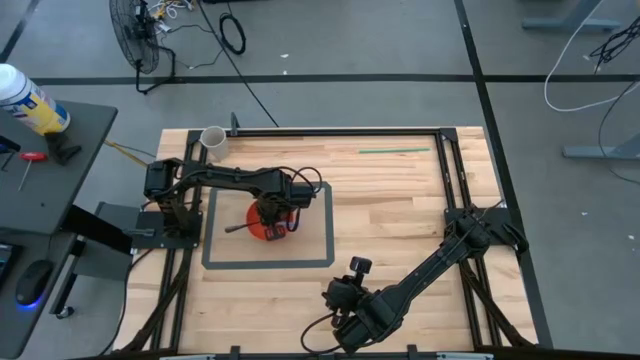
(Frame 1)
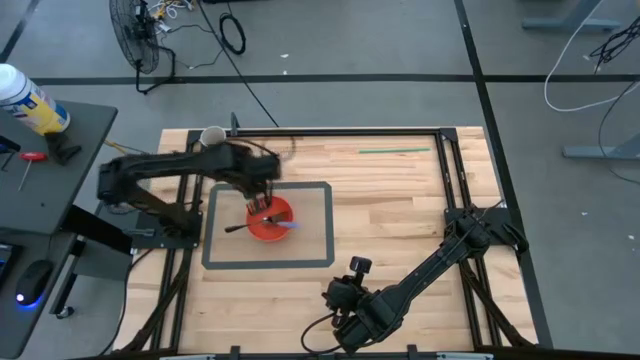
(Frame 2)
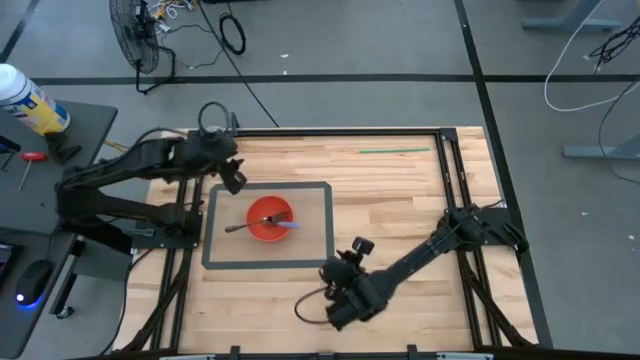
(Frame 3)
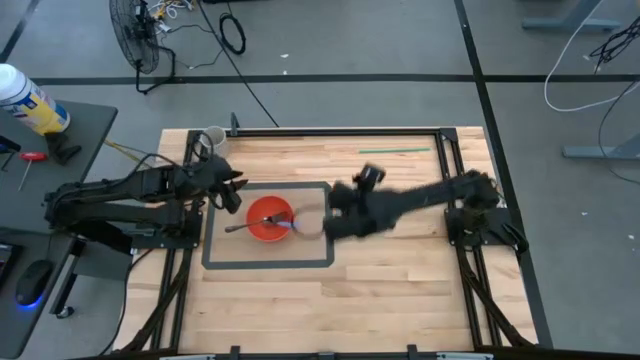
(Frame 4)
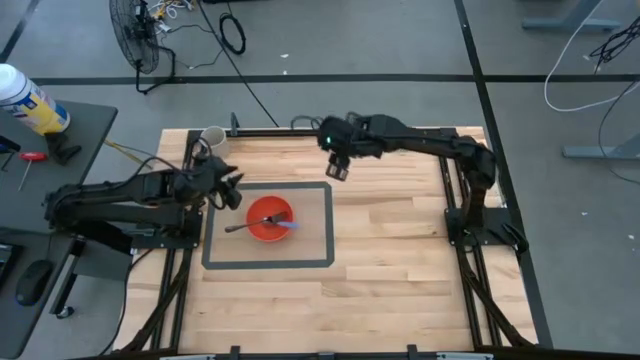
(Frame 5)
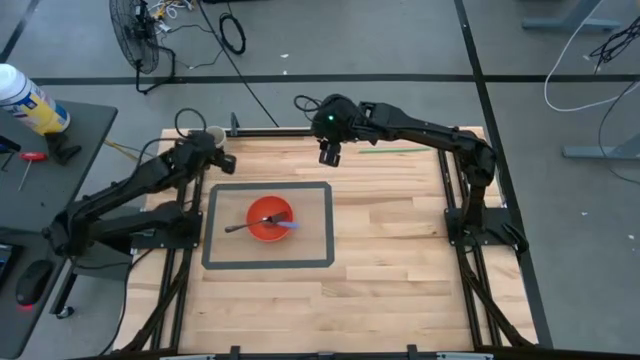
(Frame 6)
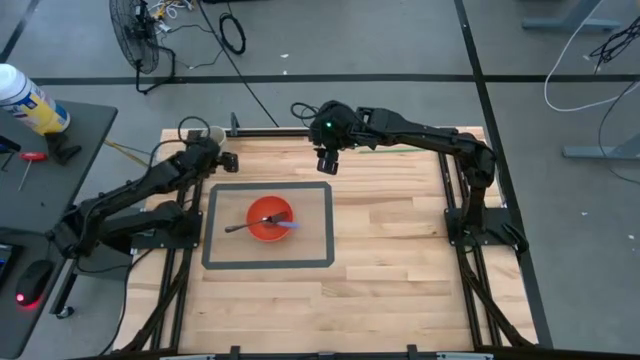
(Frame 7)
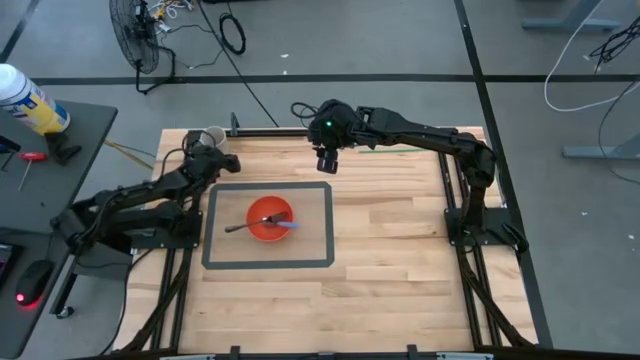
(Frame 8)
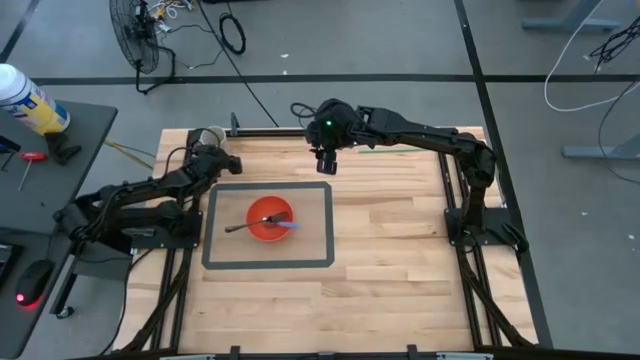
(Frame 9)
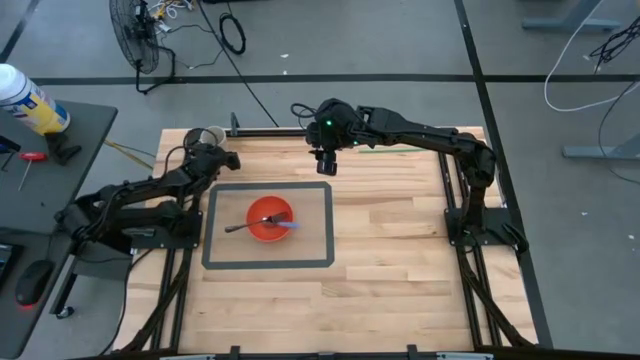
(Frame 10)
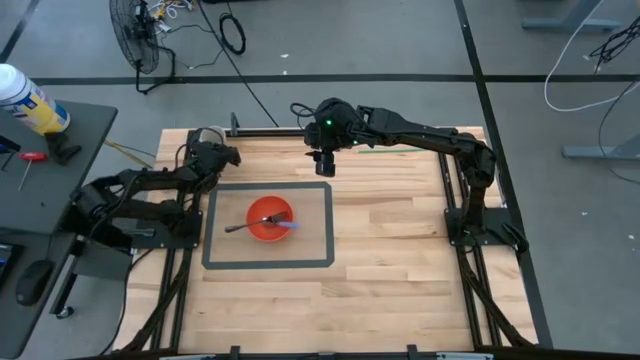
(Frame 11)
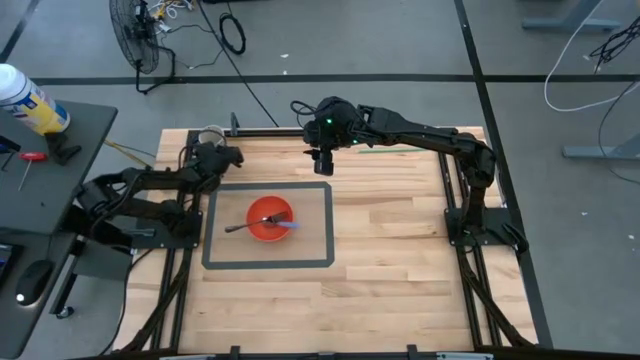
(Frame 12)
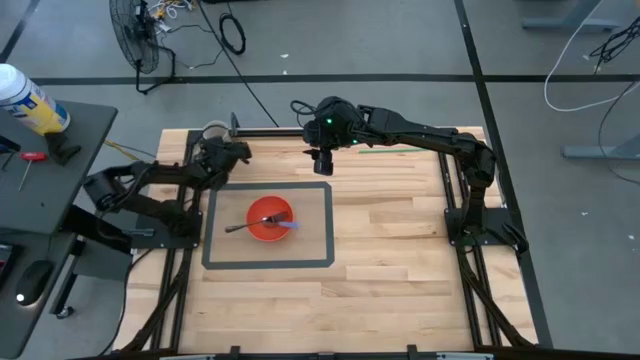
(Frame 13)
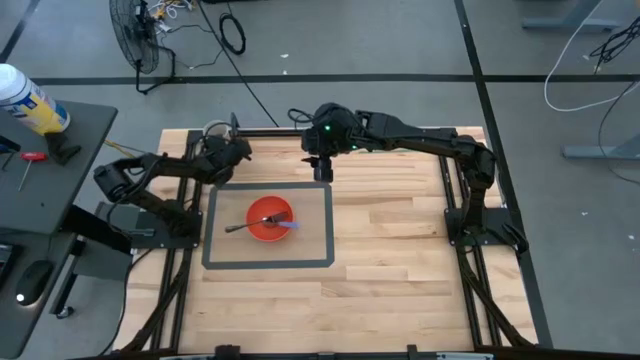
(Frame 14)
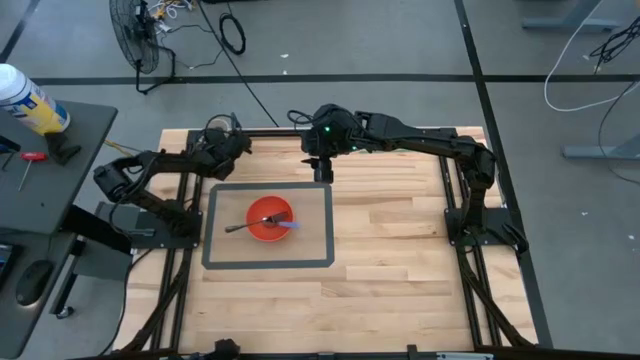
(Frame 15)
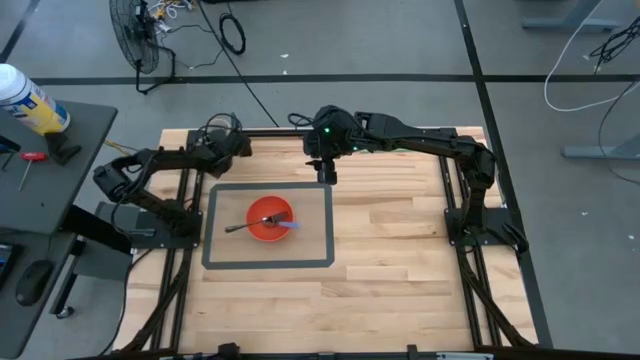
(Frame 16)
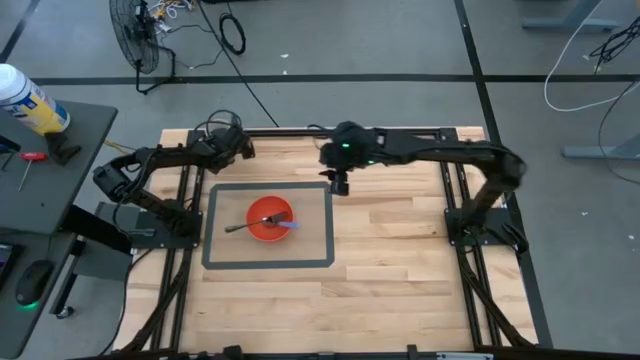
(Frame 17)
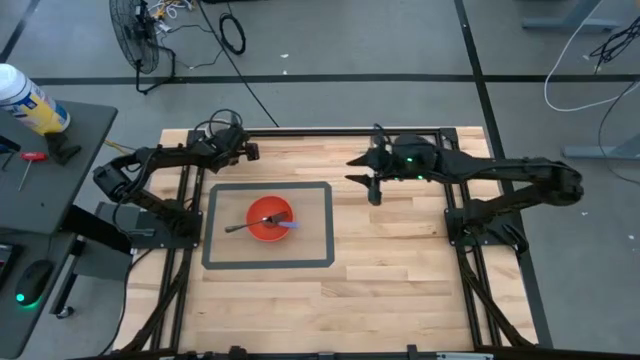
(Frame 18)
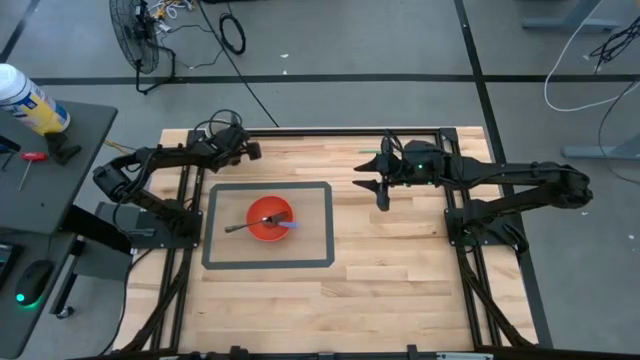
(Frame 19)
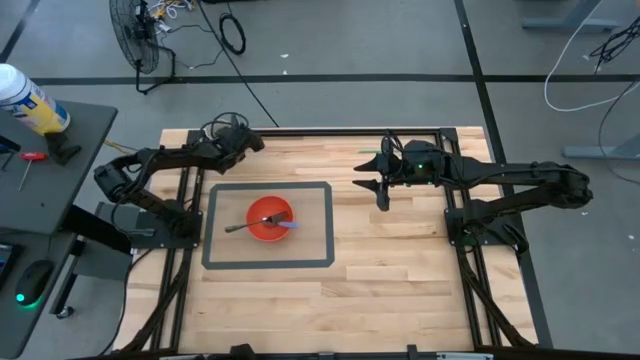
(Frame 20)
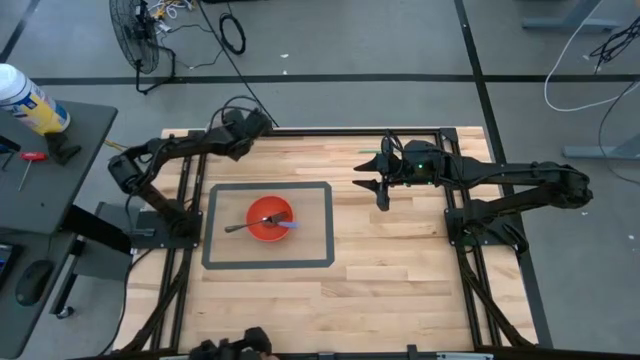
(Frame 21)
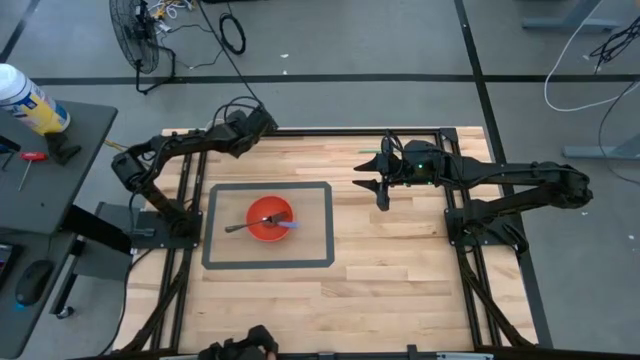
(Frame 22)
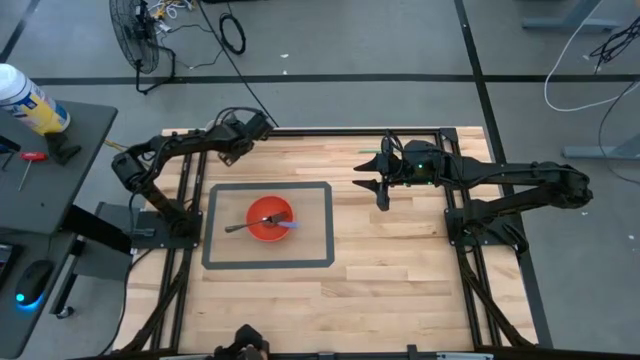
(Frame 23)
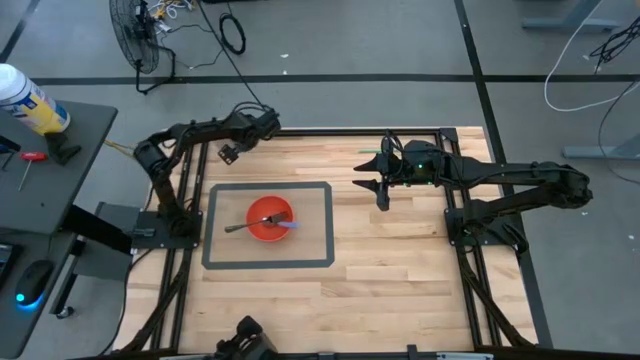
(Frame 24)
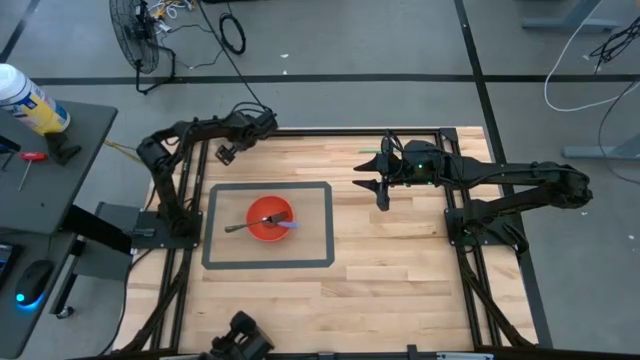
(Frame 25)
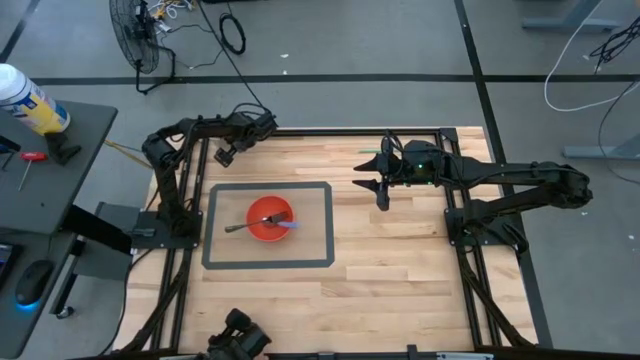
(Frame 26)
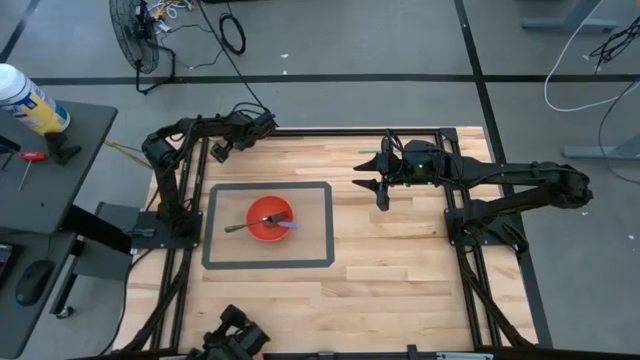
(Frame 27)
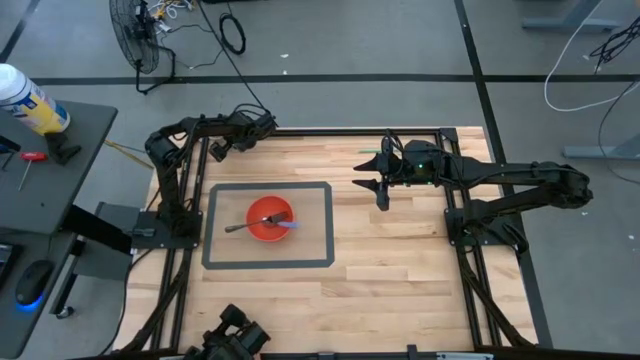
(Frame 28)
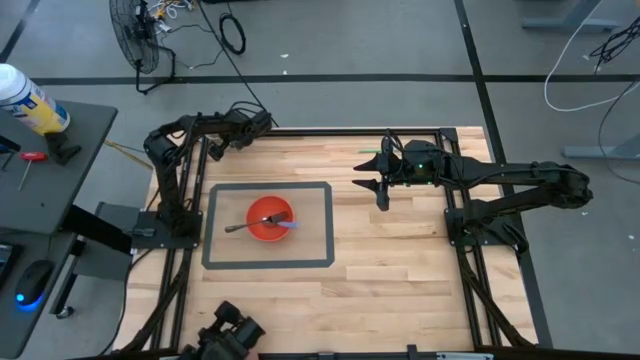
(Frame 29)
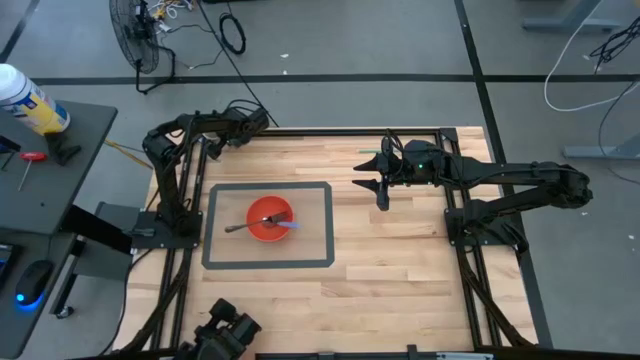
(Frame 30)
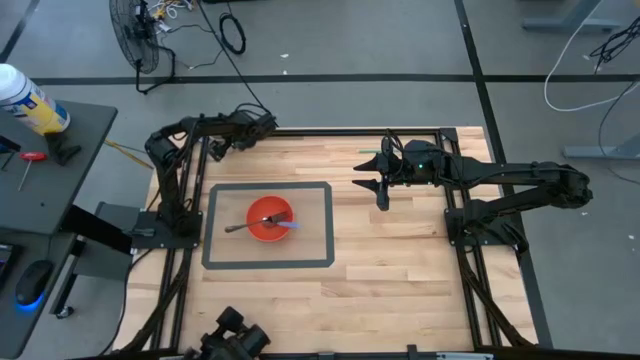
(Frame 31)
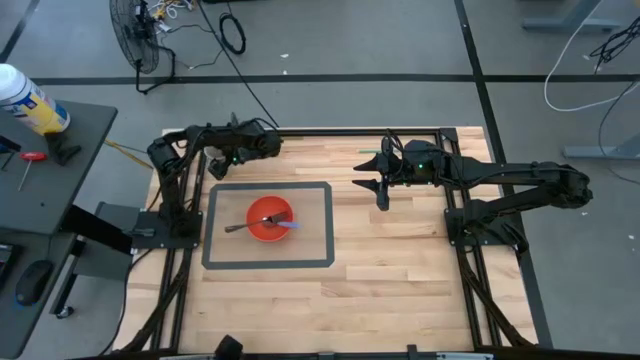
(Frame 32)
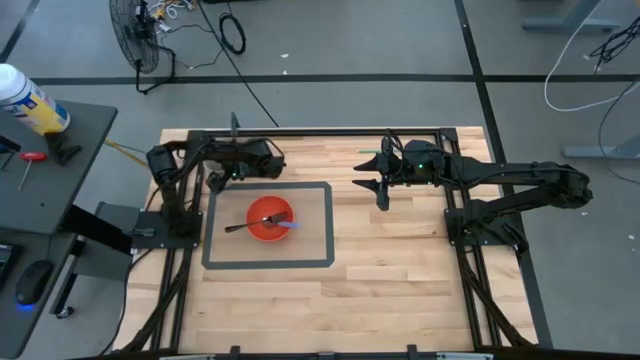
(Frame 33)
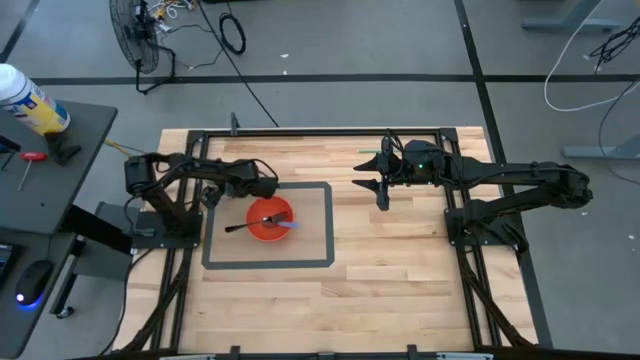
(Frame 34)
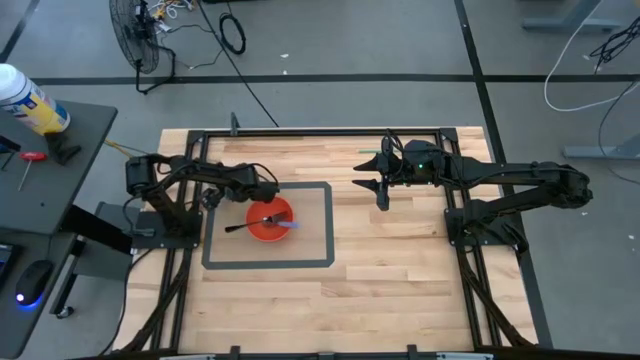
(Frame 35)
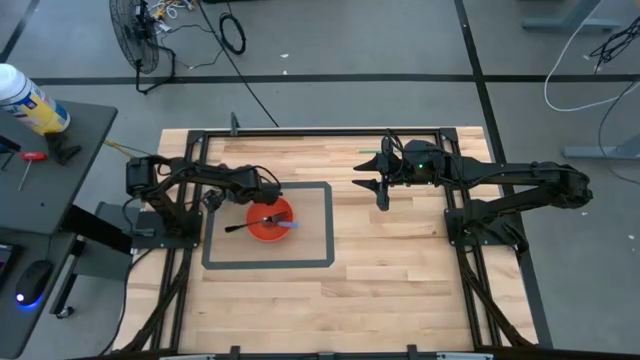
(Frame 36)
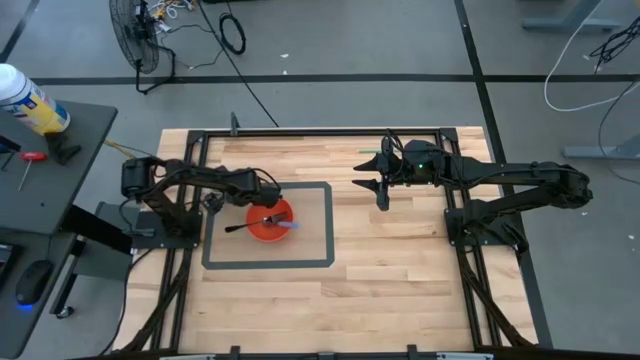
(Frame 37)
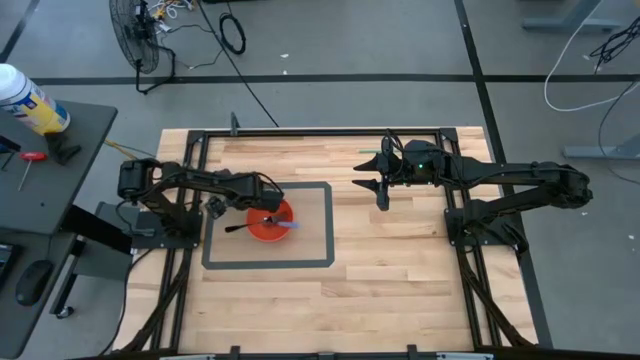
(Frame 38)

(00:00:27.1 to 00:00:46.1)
Task: Pick & Place Utensil
Put the gray cup on the transparent mat to the top left of the orange bowl

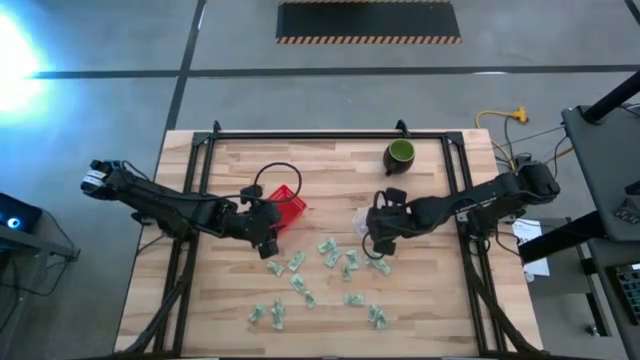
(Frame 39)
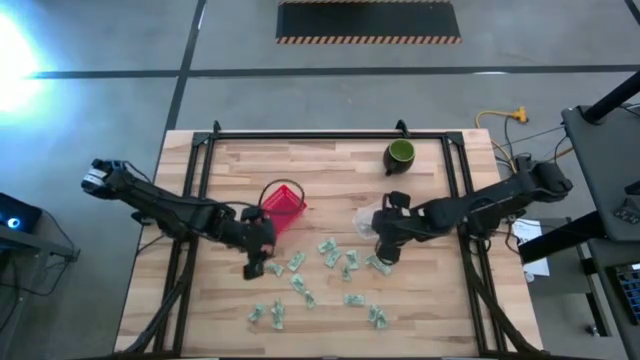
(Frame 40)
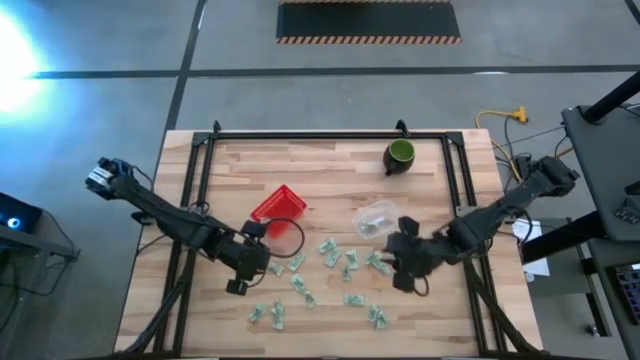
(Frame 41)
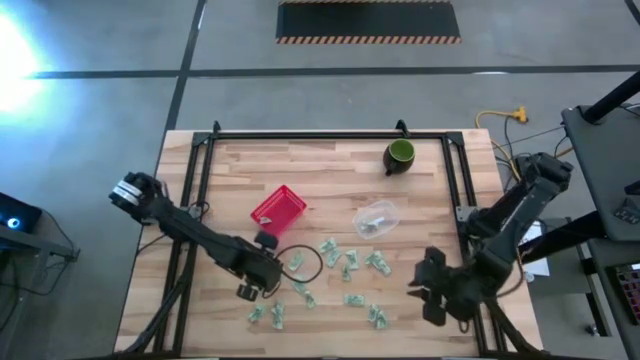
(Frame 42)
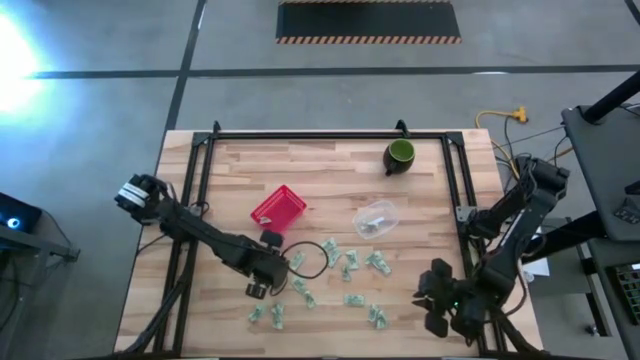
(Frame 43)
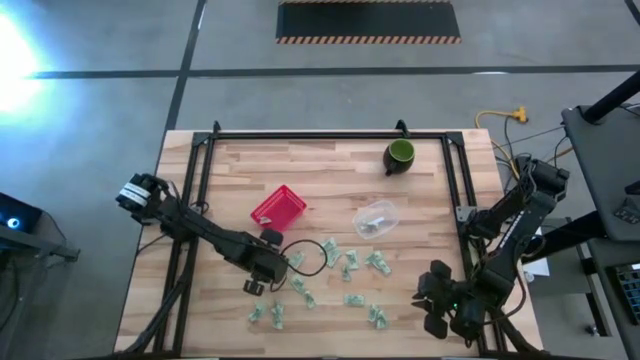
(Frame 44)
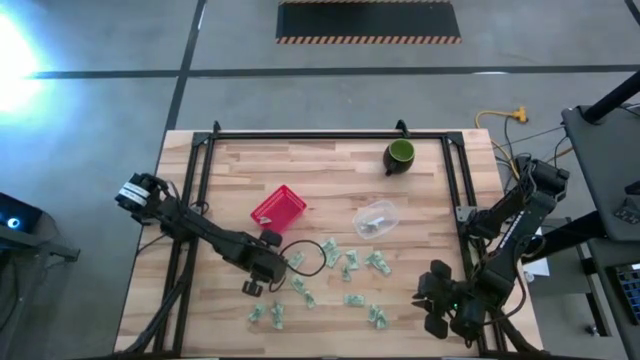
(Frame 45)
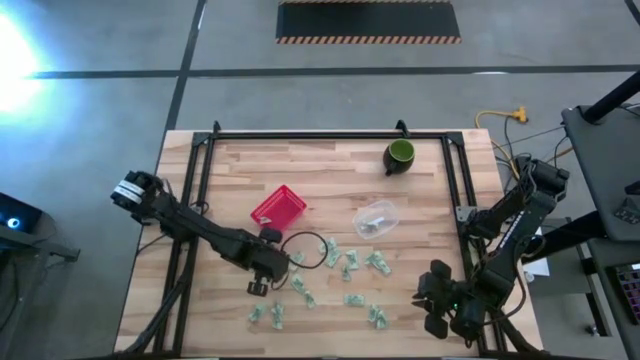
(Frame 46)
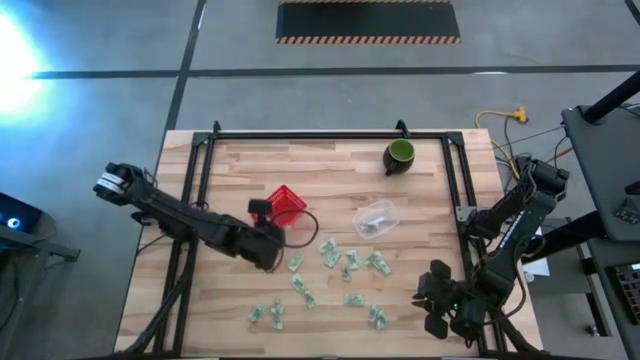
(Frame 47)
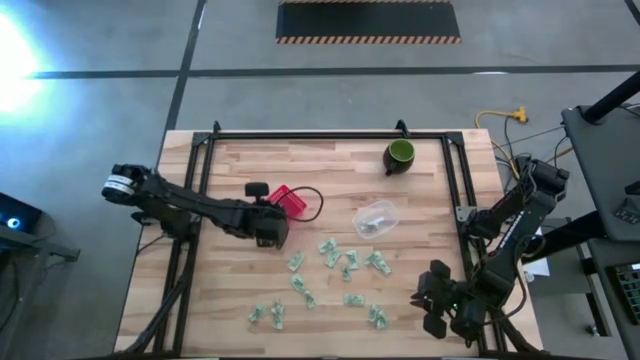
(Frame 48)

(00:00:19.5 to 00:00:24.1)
Task: Pick and place items into bin
Put the stevia packet into the red bin
